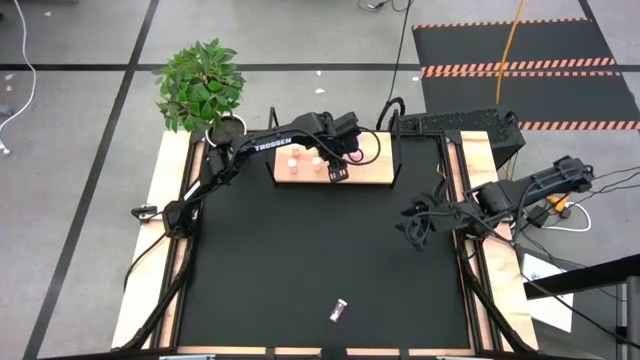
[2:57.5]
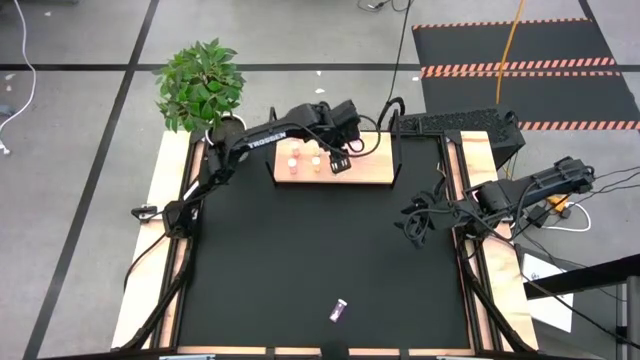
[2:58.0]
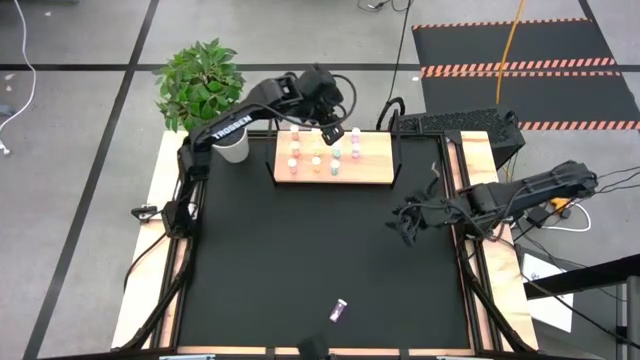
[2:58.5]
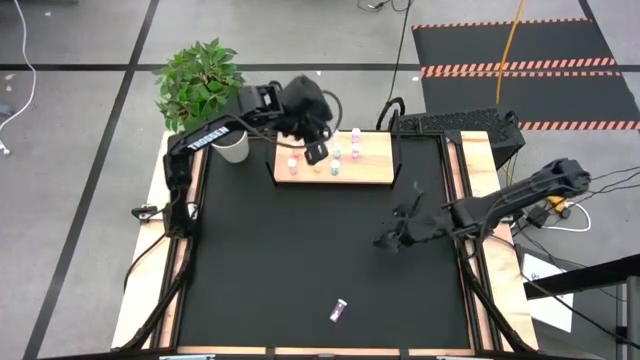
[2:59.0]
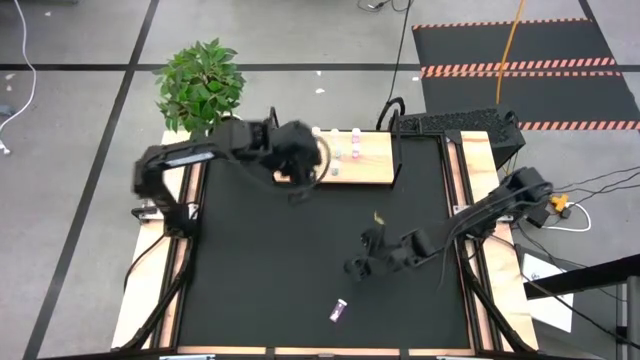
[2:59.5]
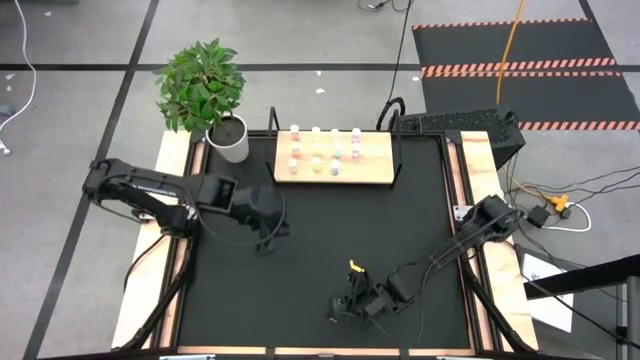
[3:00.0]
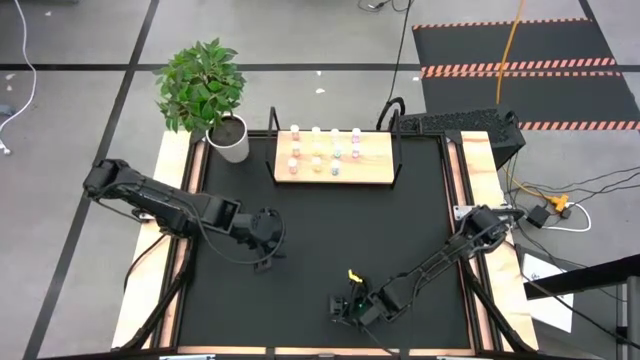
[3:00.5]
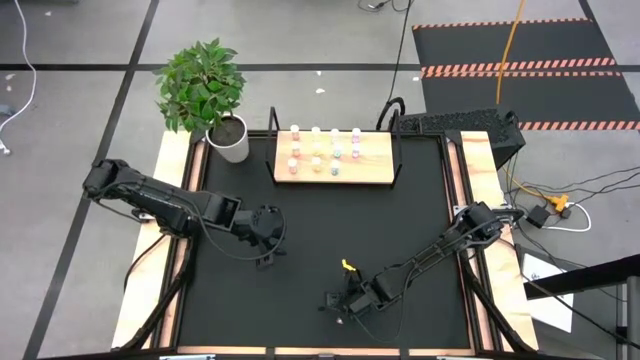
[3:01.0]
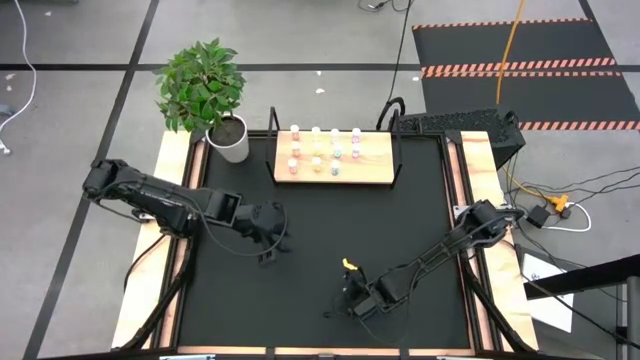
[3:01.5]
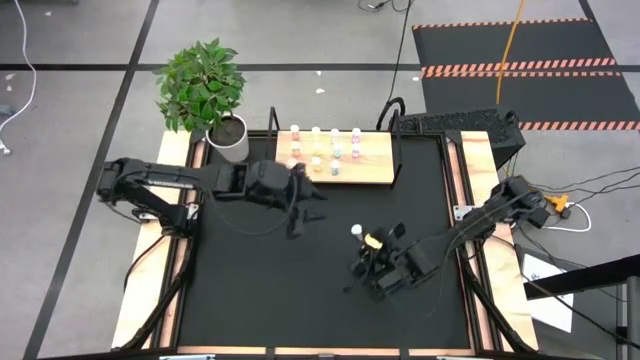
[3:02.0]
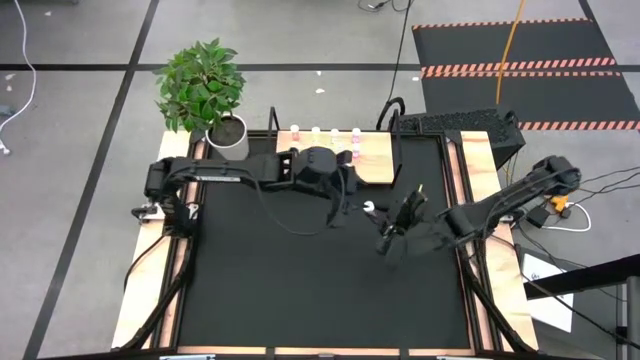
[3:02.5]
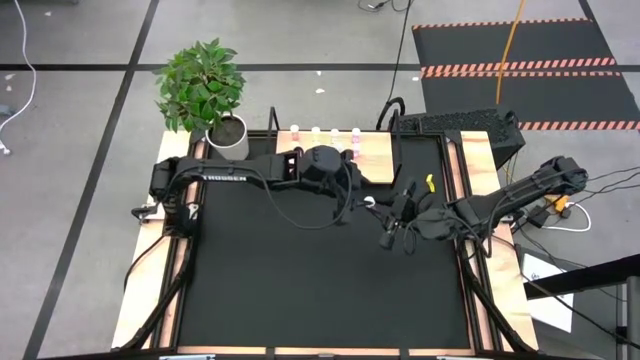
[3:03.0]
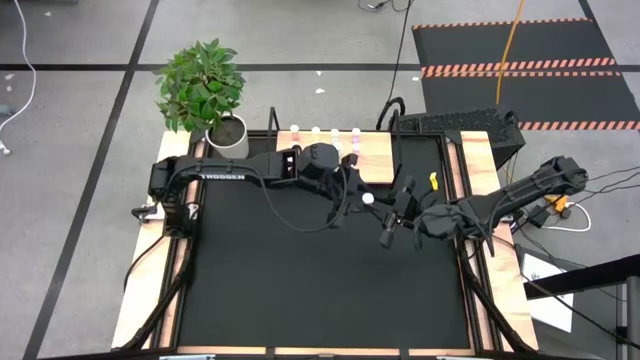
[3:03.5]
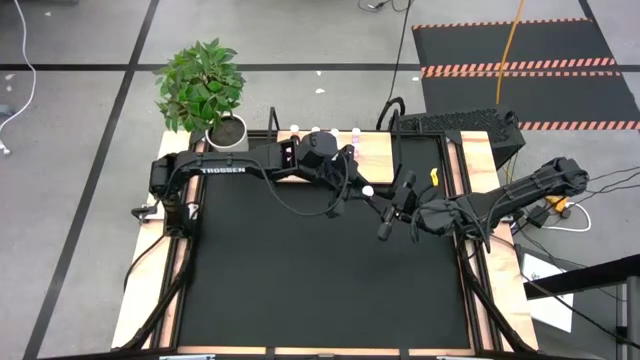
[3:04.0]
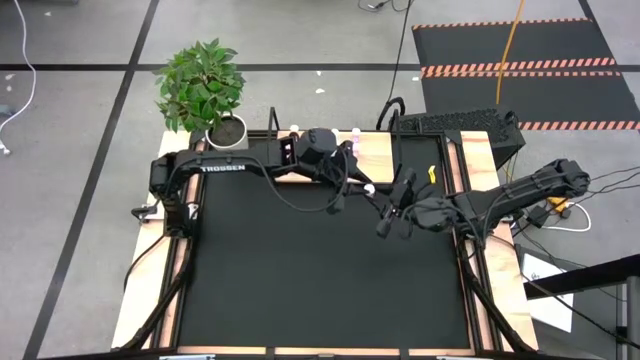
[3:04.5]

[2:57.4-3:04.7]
Task: Pick and place medicine bottles onto shelf by color
Put the violet pill bottle on the shelf aligned with the other violet pill bottles

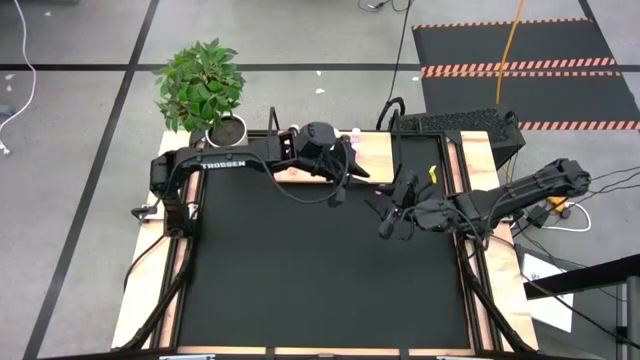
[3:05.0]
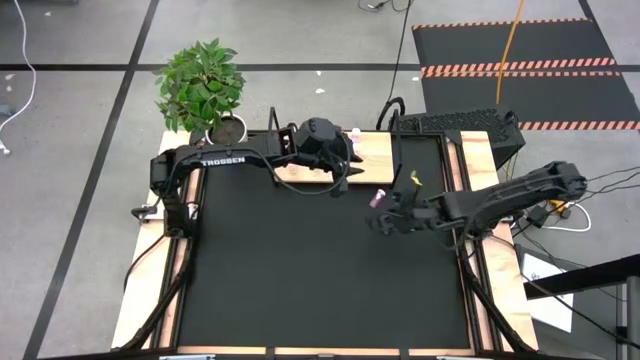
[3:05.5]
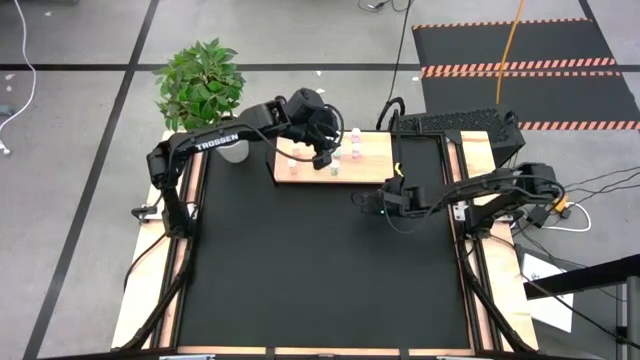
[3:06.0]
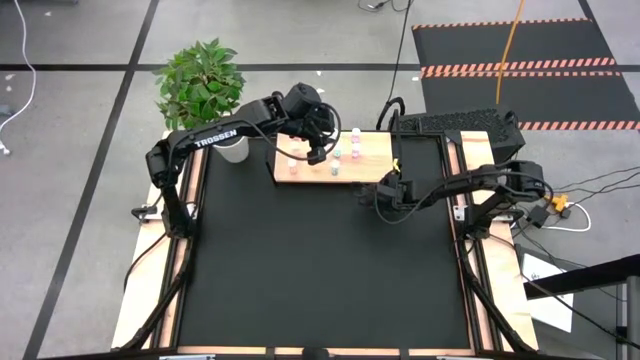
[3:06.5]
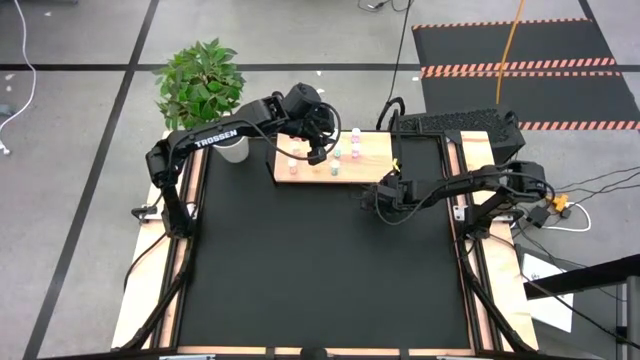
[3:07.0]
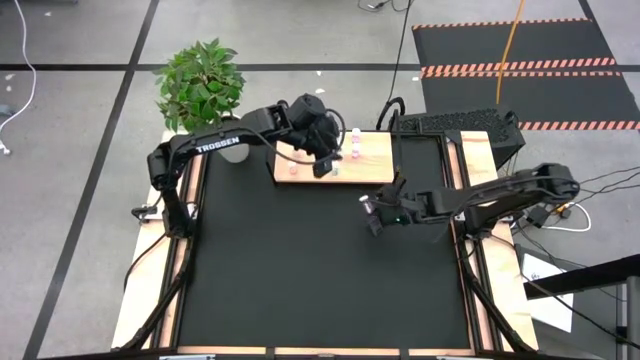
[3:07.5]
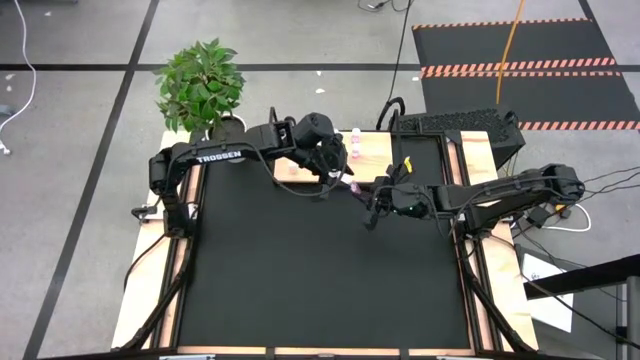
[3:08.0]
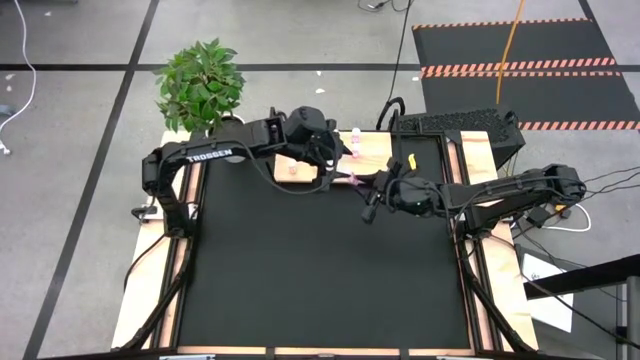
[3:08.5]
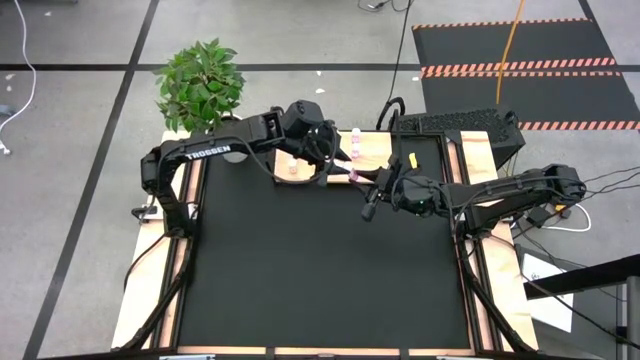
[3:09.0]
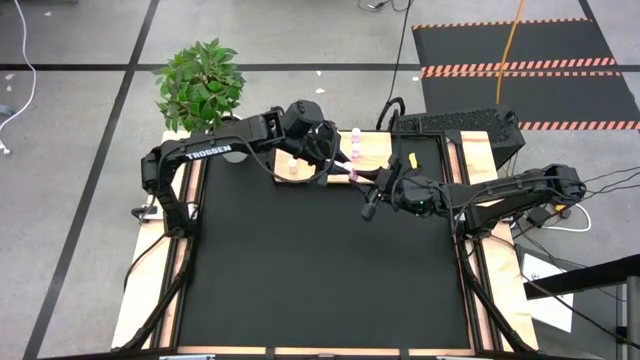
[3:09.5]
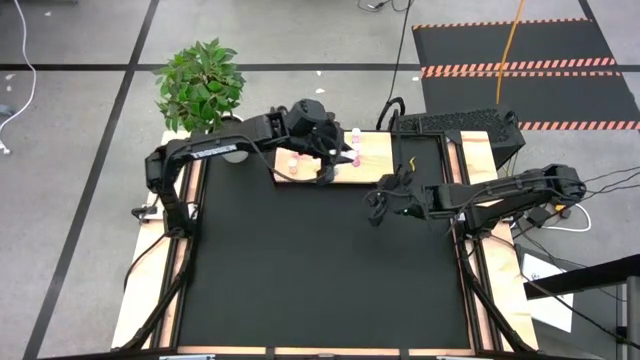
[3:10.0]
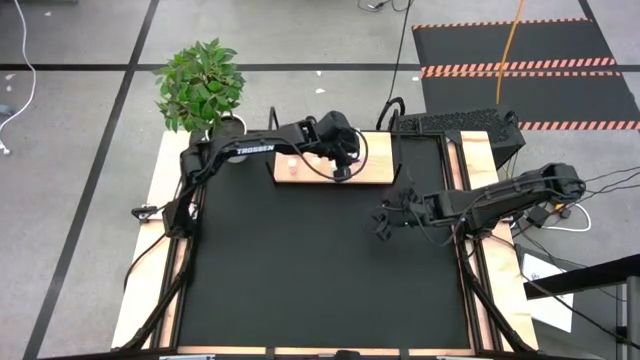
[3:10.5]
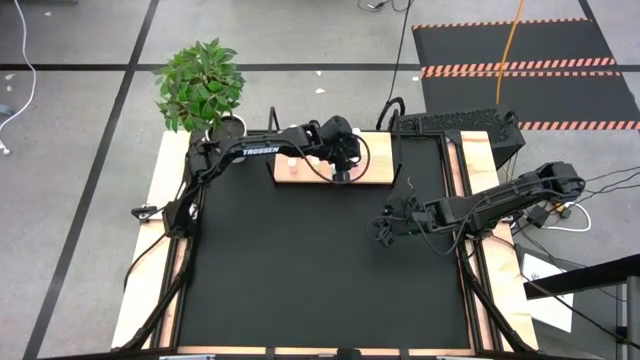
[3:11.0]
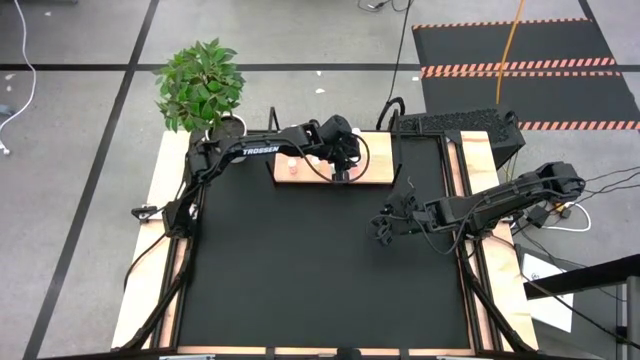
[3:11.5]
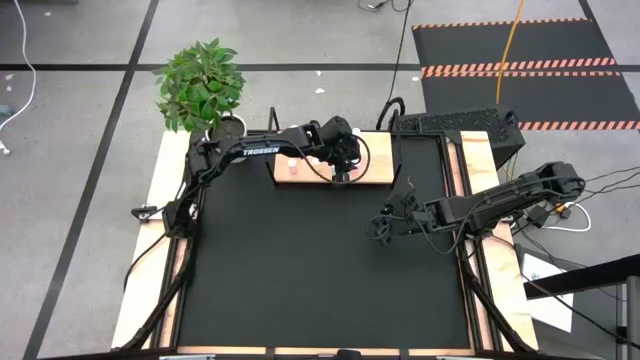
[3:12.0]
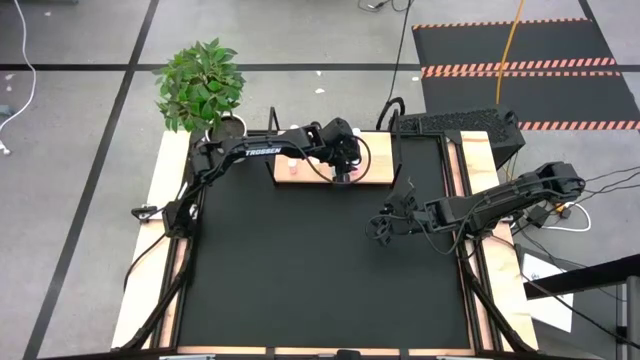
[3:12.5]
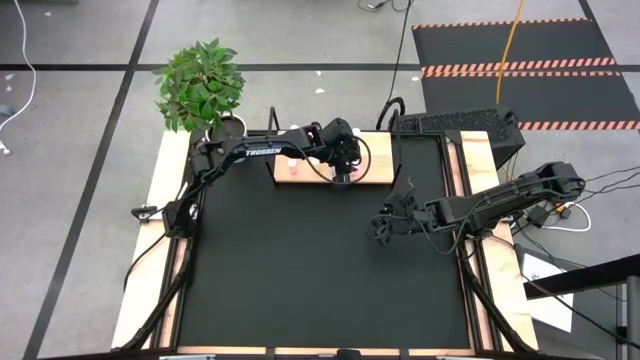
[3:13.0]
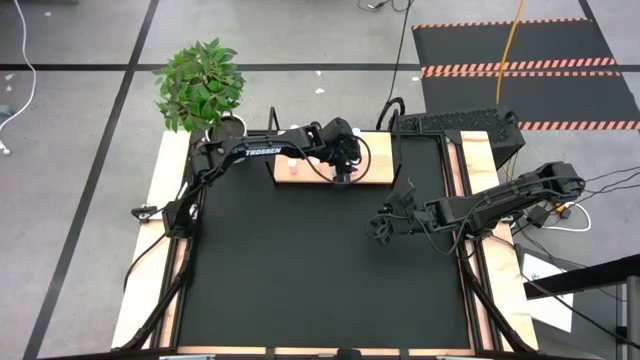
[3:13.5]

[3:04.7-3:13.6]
Put the violet pill bottle on the shelf aligned with the other violet pill bottles

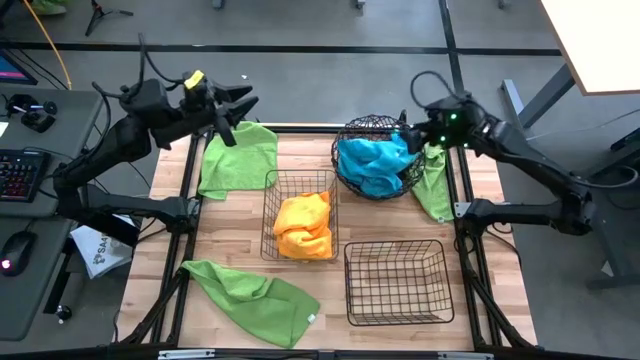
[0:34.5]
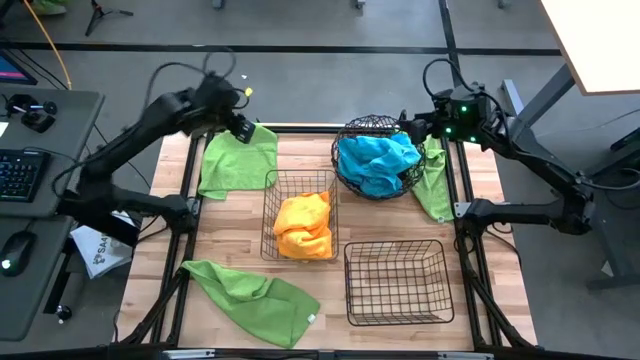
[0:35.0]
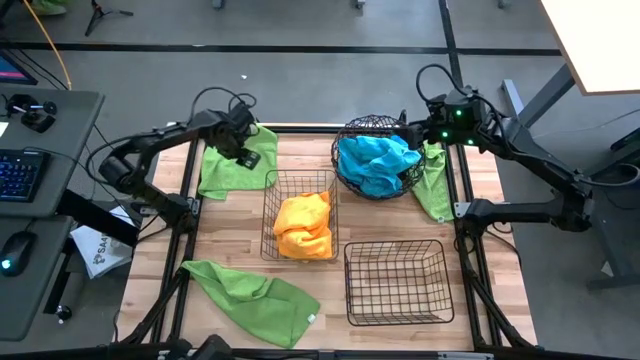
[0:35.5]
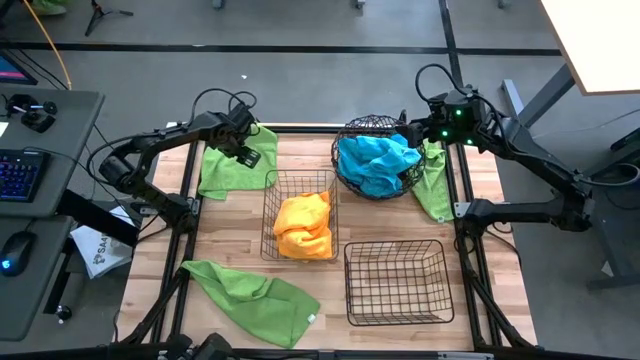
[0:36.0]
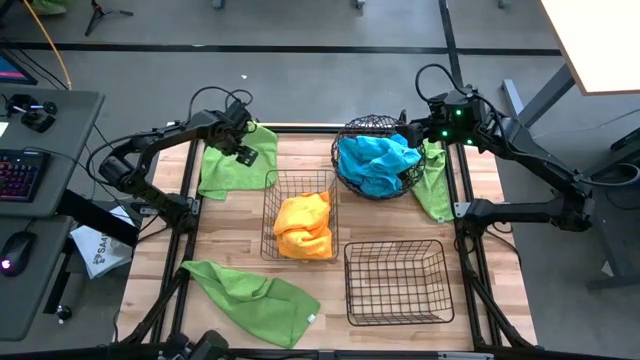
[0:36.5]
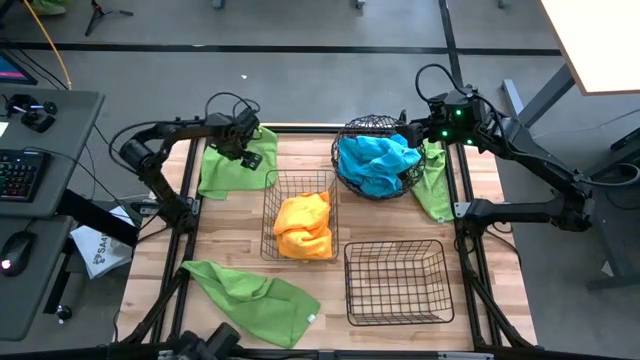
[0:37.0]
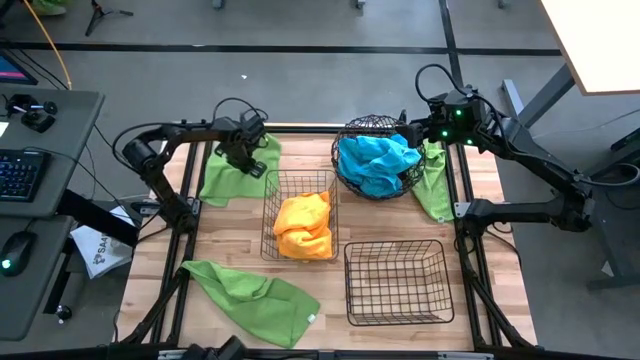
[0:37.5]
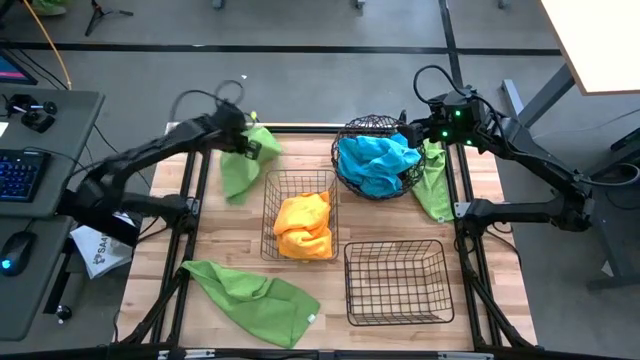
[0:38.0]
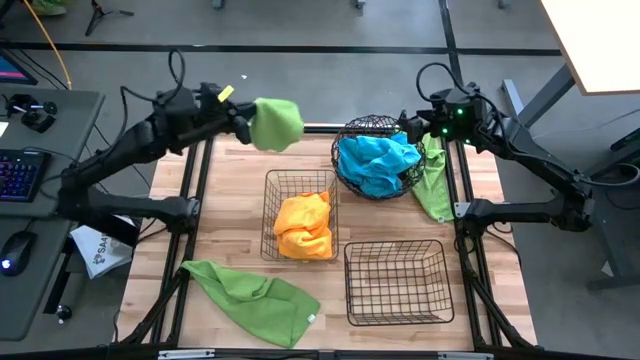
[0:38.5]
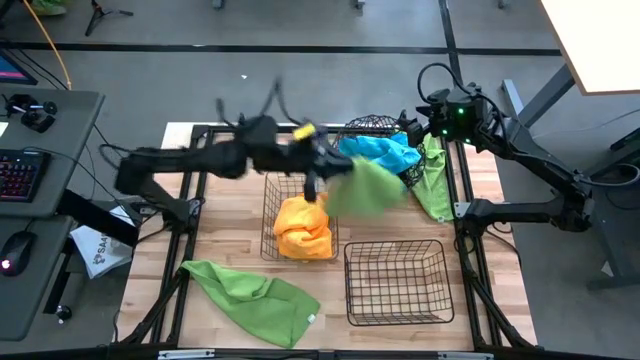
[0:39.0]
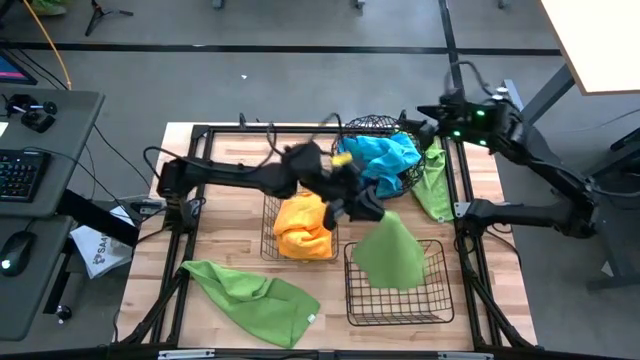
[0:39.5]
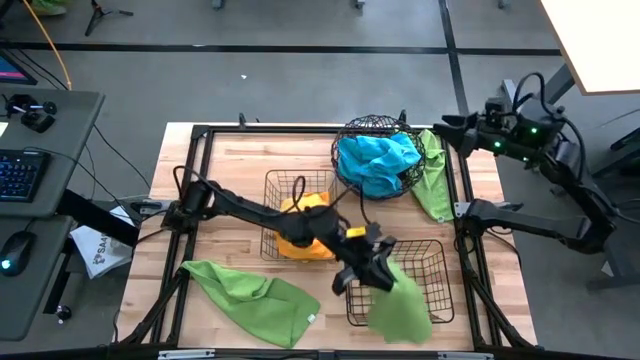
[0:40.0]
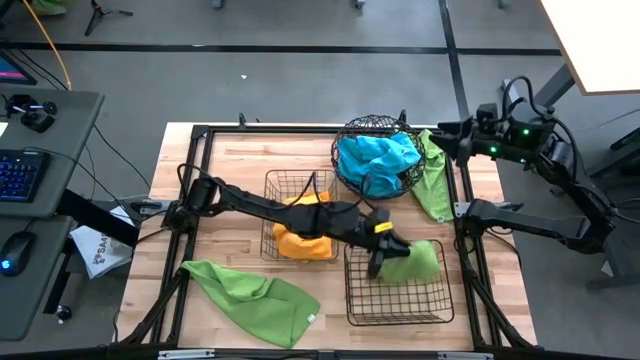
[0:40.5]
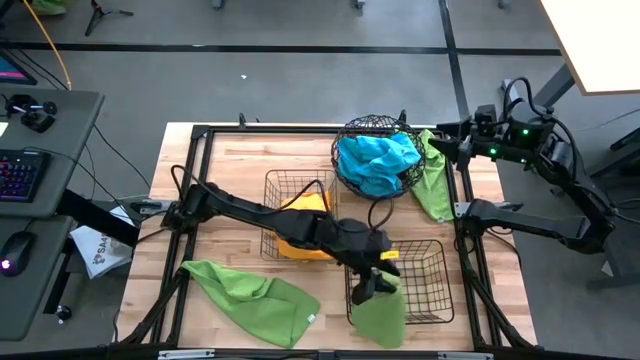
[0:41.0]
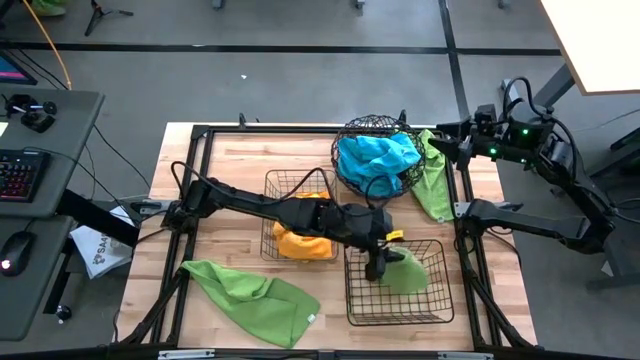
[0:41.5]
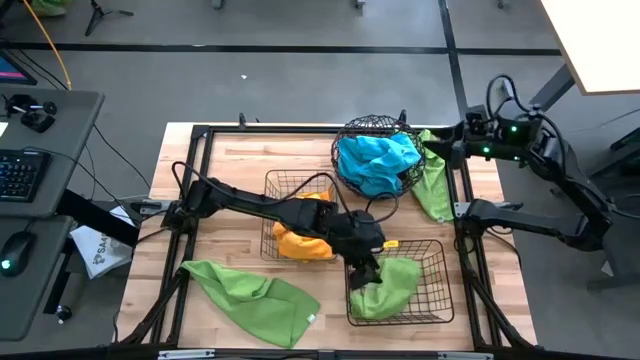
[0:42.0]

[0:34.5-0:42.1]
Task: Sort microfiber towel by color & place in baskets
Put the top left green microfiber towel into the bottom right black metal basket
